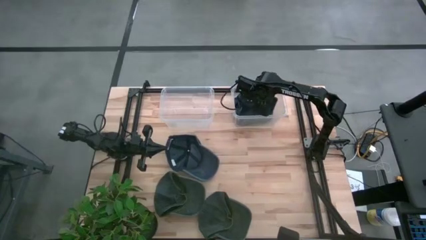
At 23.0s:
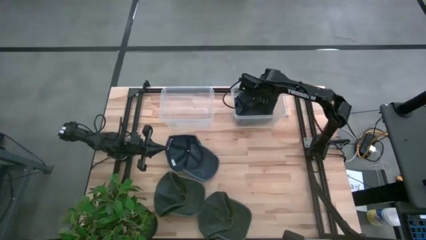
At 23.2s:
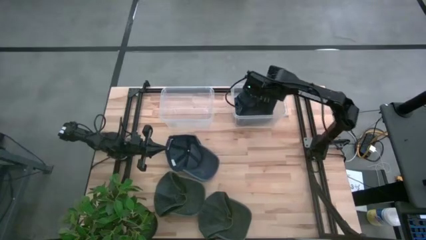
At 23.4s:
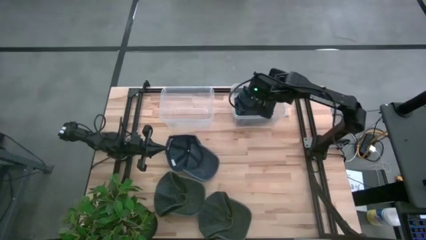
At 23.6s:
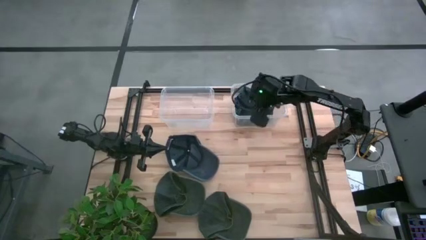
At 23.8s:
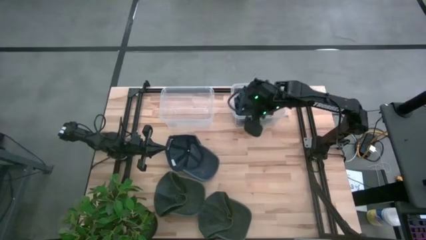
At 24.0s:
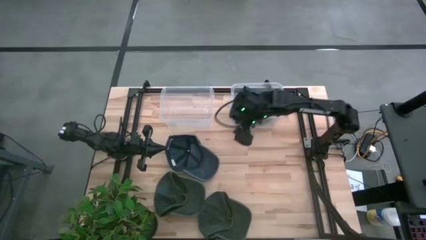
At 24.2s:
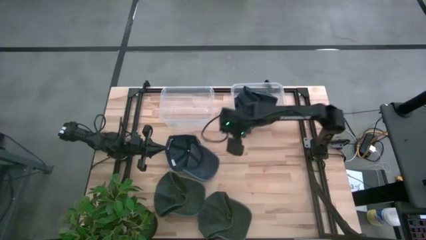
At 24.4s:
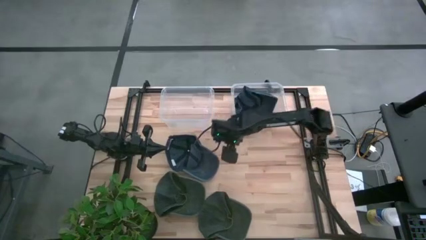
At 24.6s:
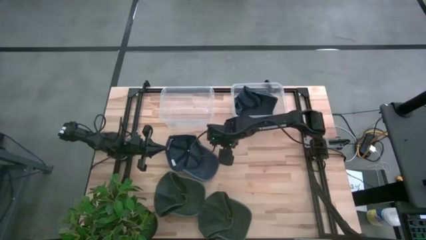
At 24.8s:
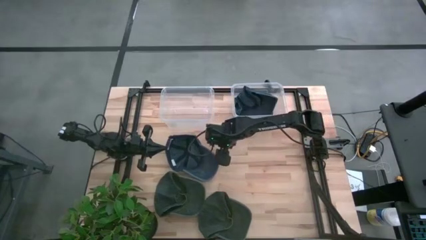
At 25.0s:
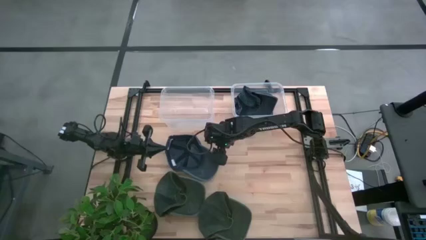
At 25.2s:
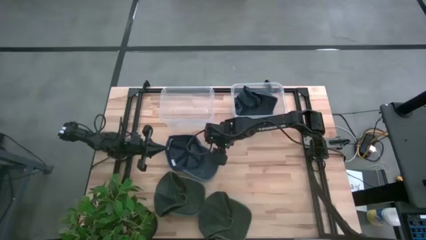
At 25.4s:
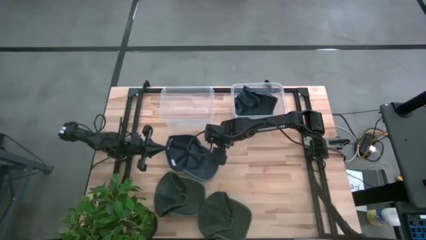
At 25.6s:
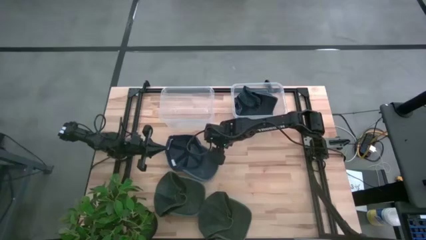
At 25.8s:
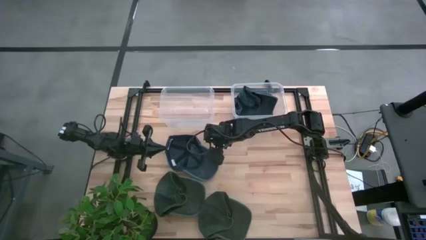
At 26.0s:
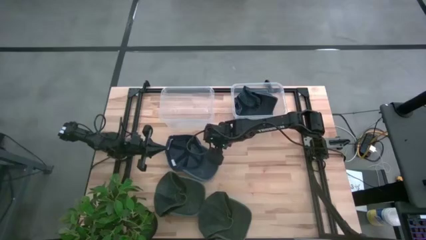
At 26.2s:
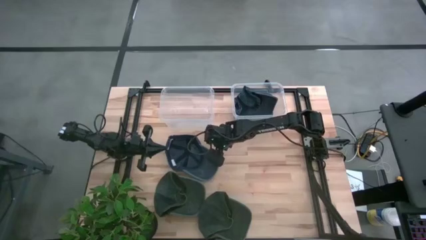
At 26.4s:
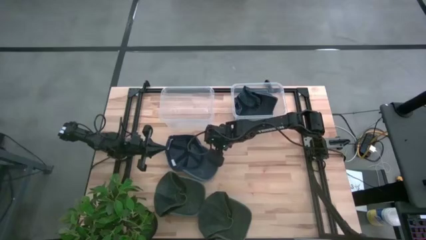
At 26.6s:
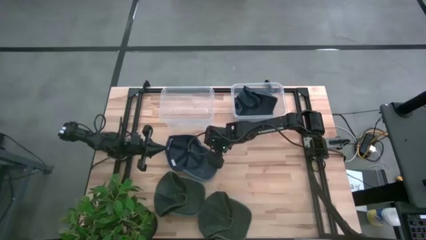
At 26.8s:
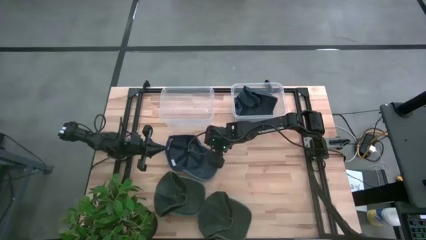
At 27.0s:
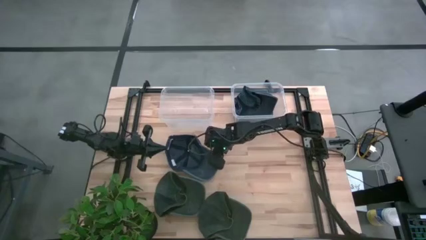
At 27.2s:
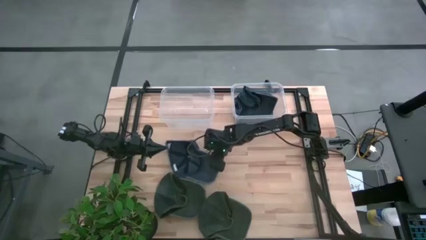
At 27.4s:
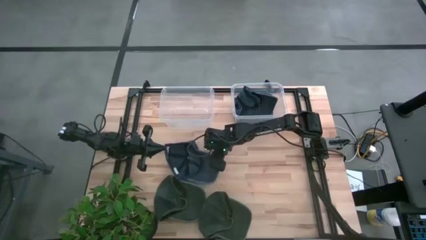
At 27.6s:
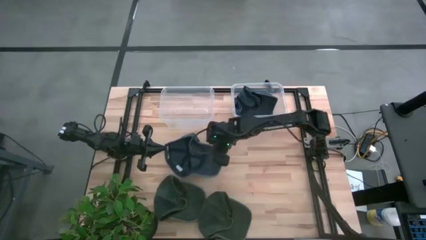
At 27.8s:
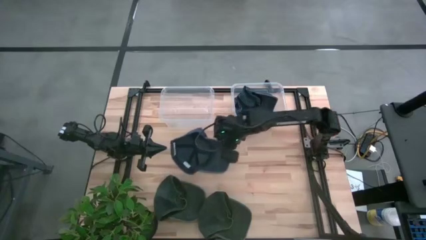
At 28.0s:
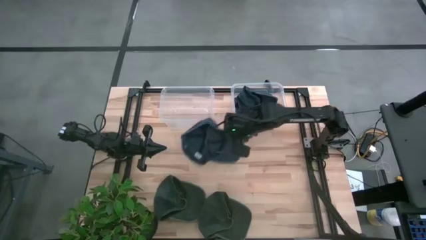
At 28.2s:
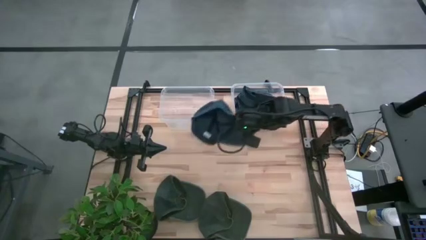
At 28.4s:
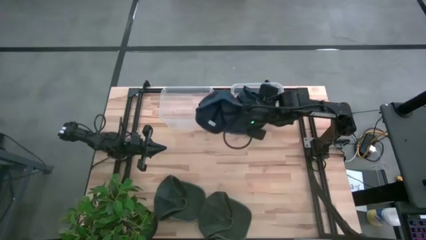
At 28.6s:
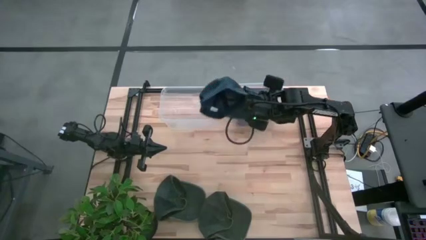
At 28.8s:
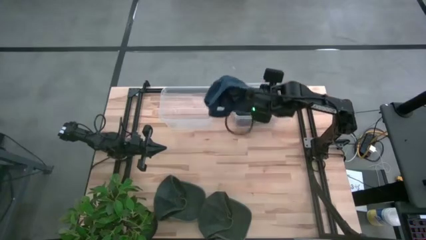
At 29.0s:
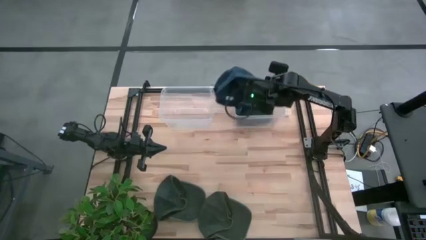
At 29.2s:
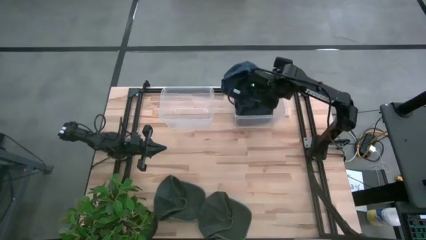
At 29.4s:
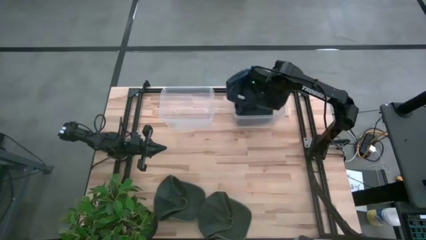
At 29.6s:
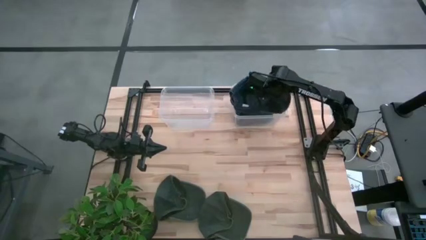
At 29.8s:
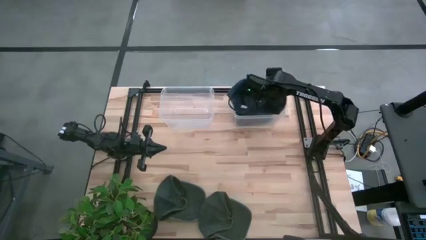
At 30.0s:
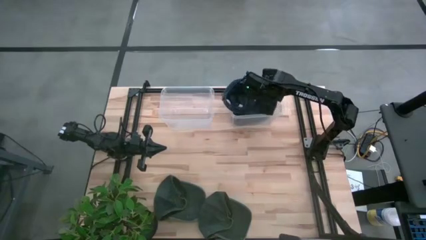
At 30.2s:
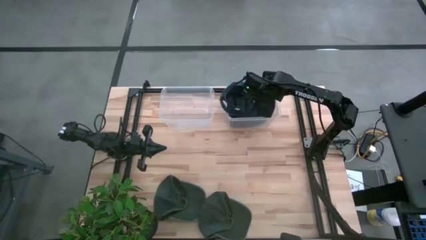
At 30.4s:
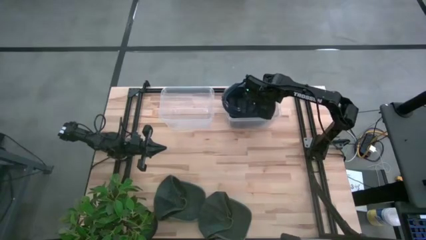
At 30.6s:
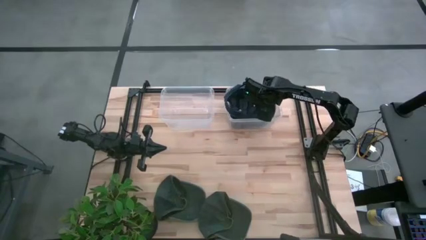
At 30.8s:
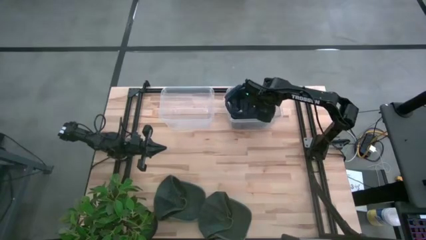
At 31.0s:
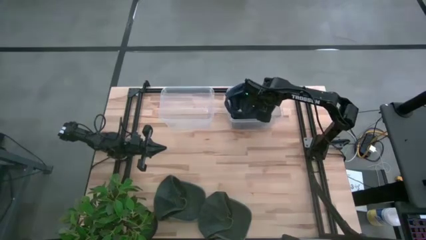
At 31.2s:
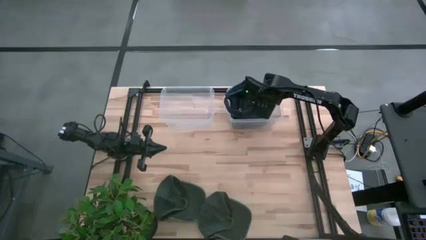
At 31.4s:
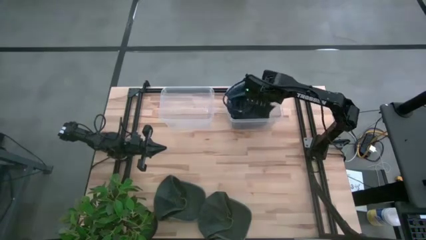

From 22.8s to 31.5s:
Task: Pick & Place hat
Put the blue cap into the right transparent bin

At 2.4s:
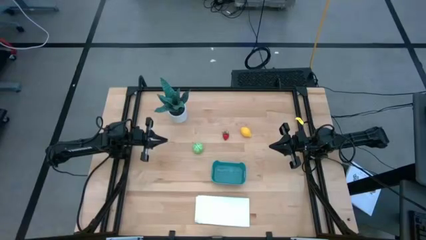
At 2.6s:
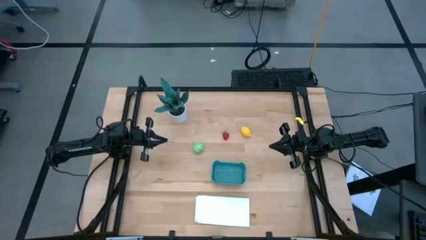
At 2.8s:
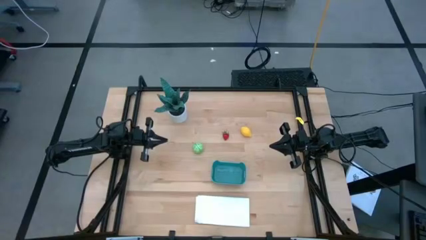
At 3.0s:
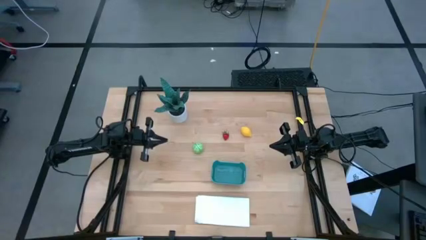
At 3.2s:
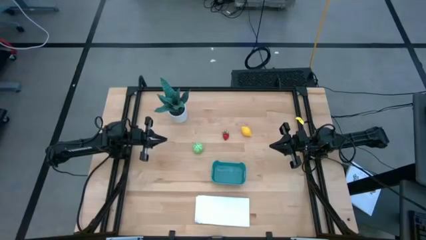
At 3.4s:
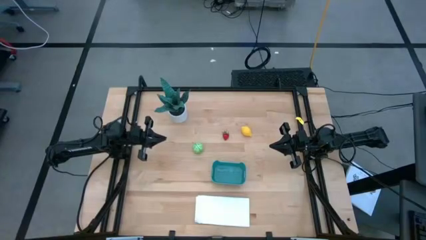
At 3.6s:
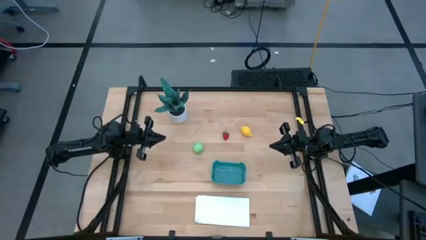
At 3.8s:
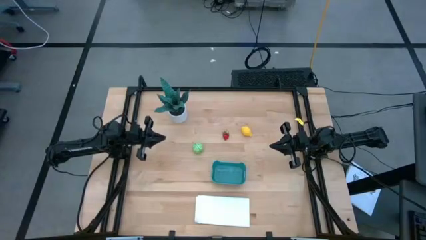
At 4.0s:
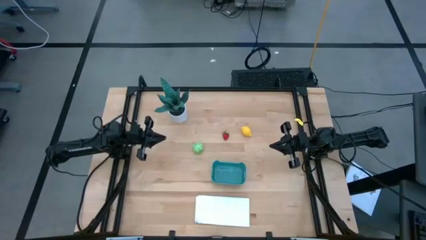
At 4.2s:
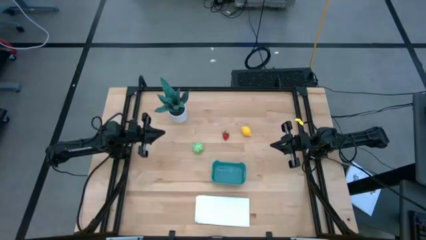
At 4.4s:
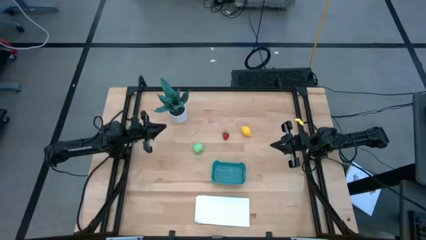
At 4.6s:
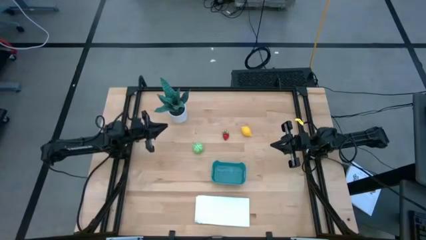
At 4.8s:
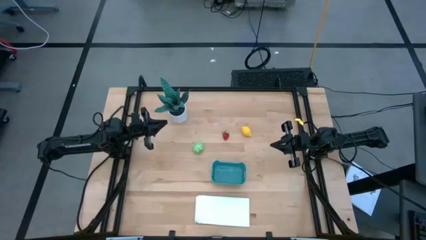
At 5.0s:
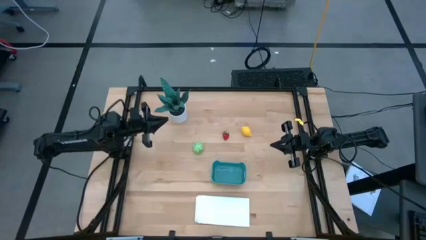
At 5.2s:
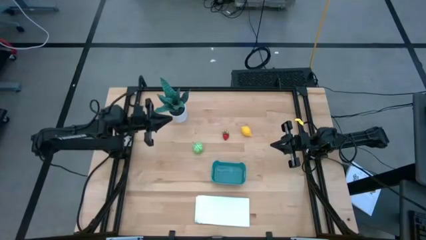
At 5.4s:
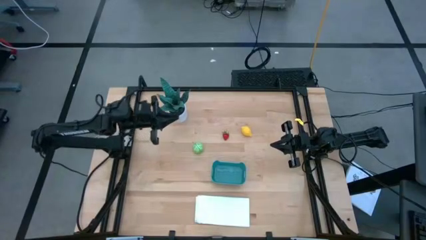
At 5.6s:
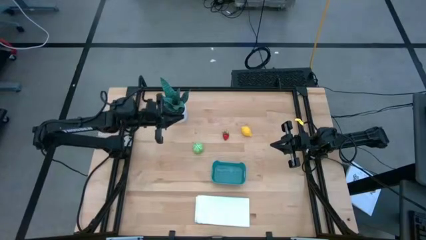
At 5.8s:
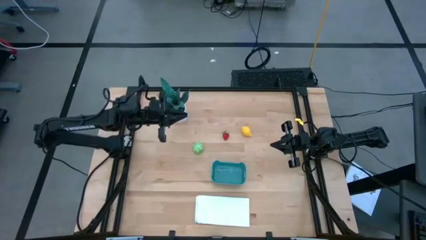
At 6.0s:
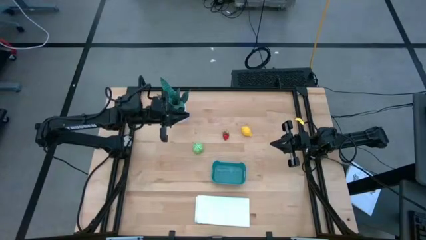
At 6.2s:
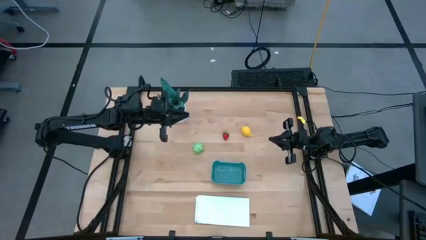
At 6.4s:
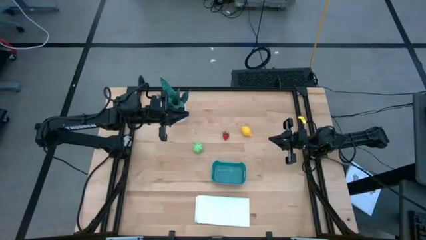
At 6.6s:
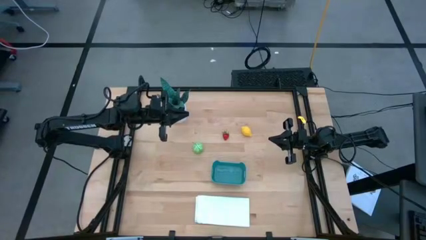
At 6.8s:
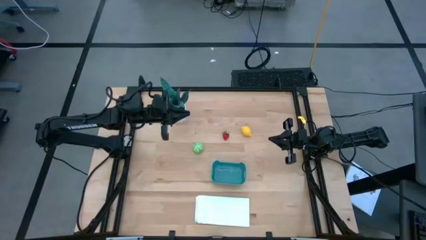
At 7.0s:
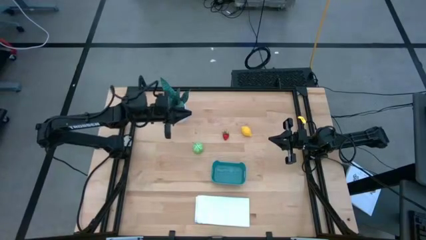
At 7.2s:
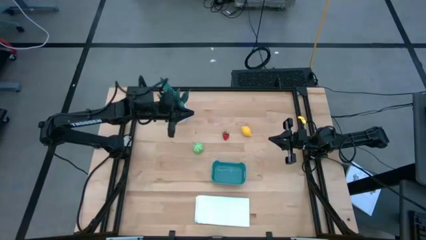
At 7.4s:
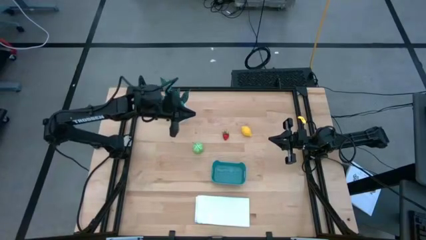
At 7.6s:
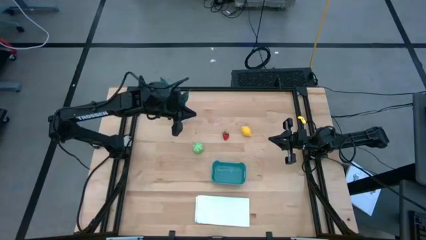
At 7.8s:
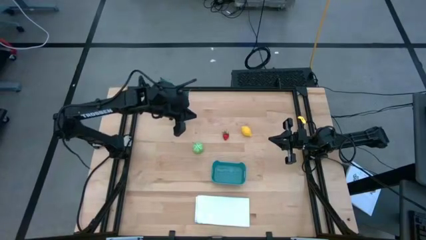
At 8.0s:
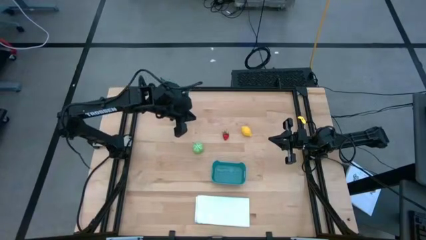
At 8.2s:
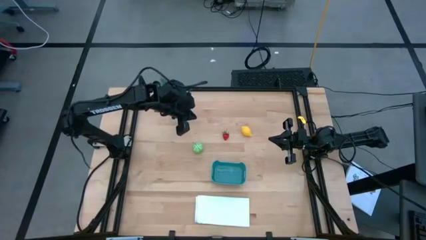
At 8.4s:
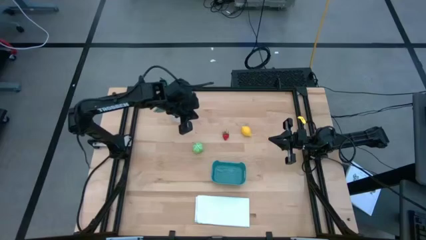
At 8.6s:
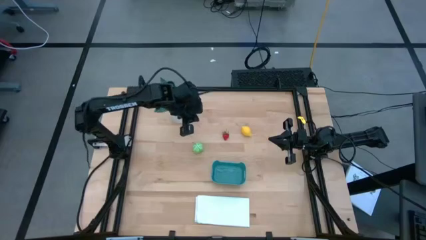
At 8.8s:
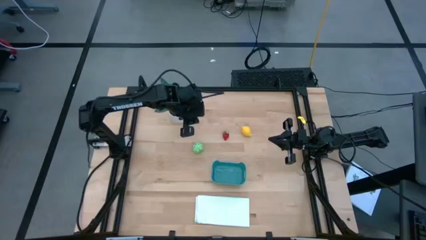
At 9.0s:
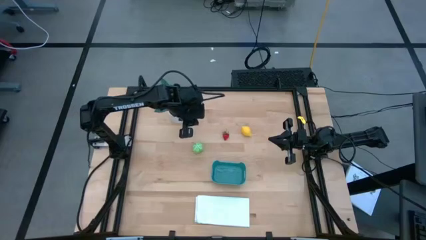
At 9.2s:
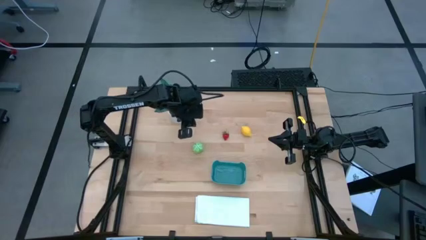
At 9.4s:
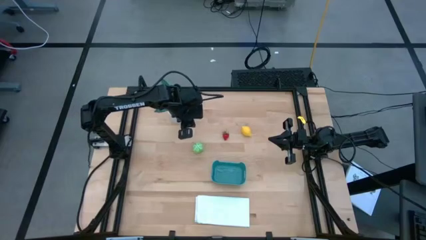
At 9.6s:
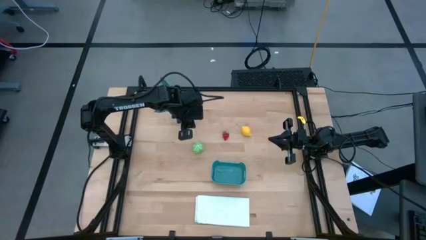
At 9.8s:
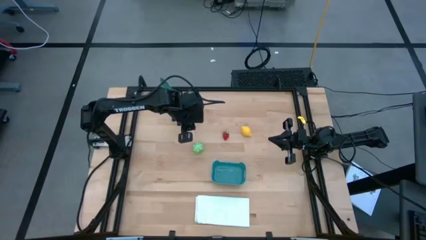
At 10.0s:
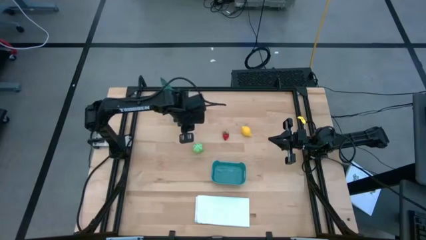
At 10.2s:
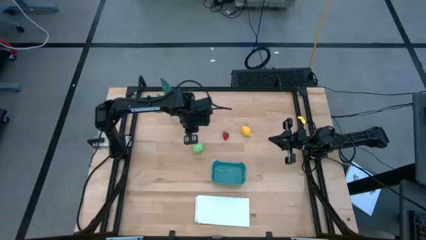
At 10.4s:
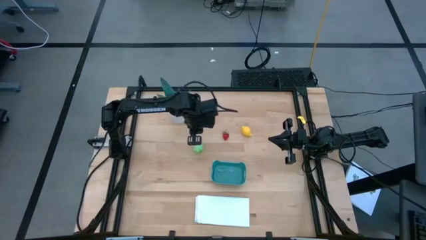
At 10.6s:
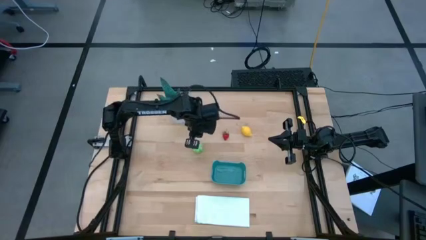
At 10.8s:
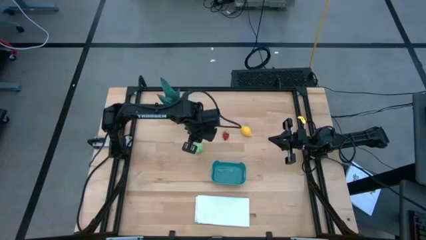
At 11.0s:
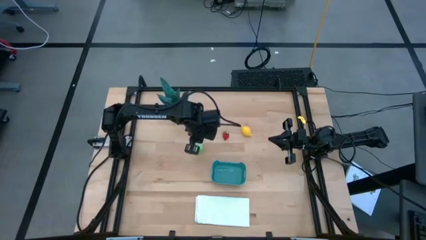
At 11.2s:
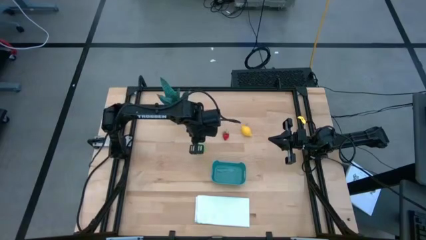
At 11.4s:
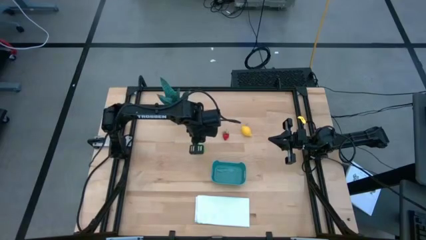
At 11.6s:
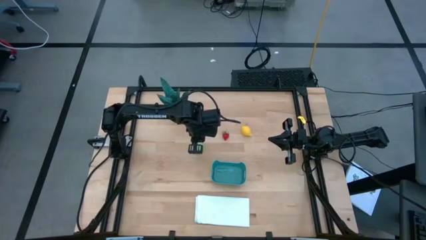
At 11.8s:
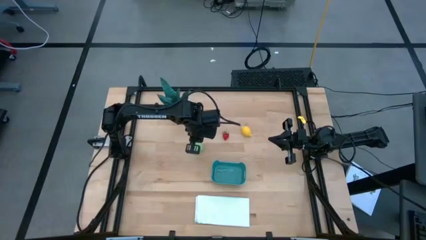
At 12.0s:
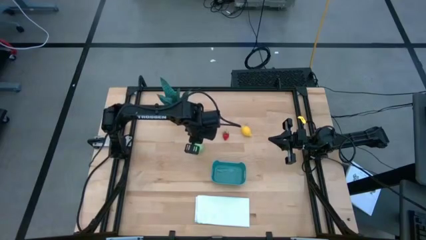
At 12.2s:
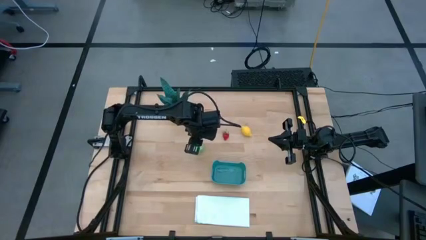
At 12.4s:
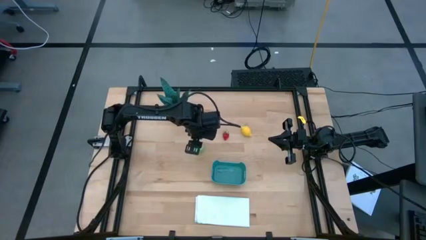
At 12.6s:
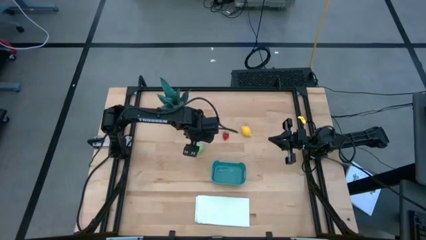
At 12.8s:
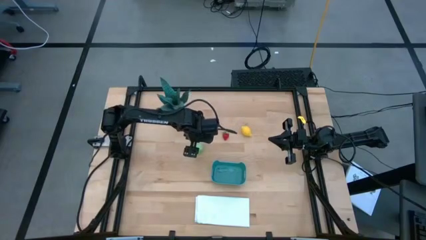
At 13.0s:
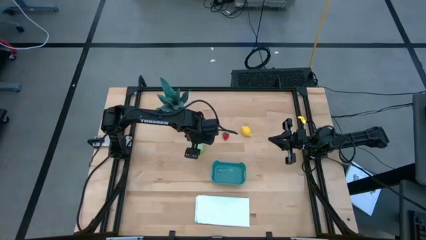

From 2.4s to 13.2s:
Task: Pick and placing Produce into tupperware
Put the cabbage into the bin
